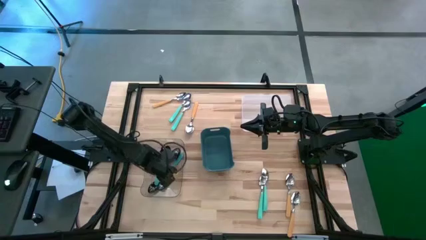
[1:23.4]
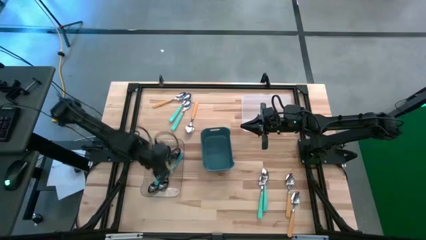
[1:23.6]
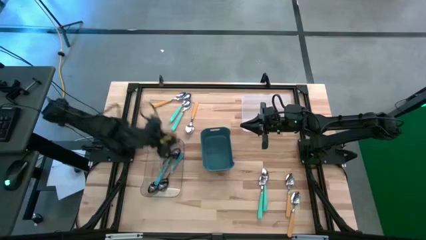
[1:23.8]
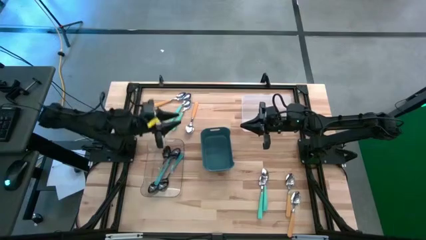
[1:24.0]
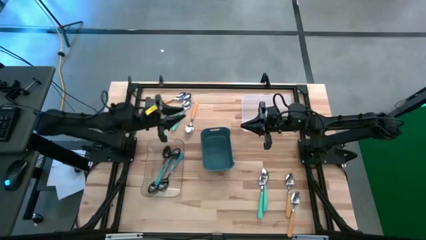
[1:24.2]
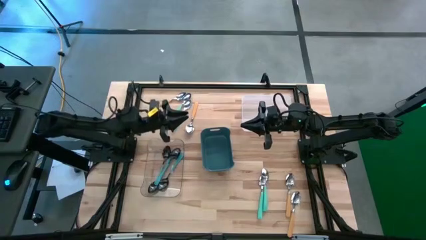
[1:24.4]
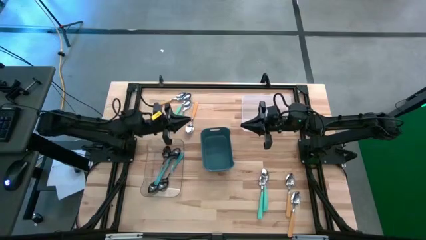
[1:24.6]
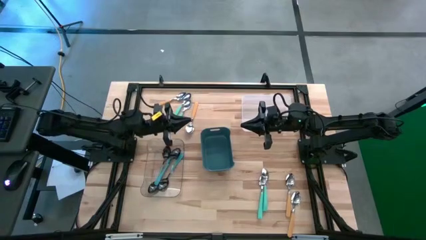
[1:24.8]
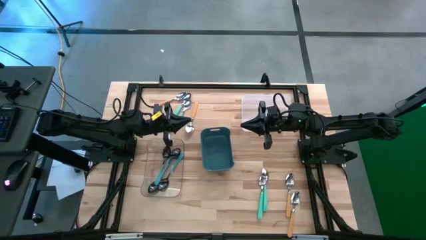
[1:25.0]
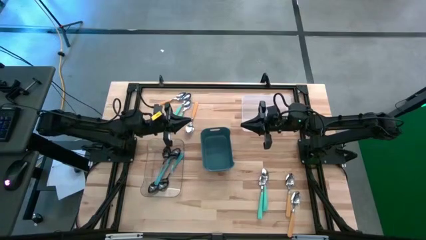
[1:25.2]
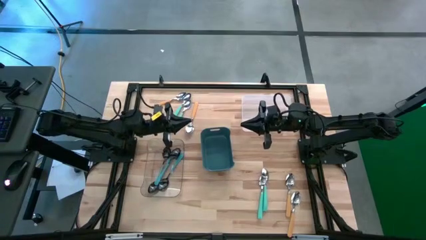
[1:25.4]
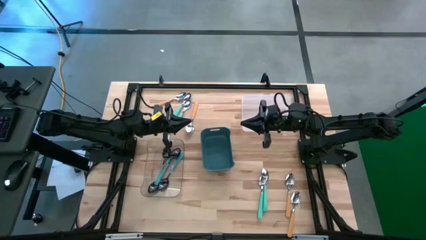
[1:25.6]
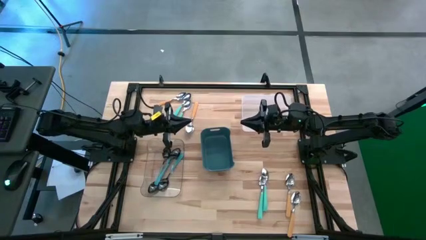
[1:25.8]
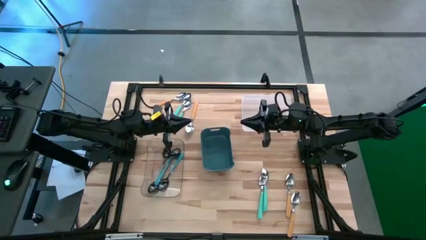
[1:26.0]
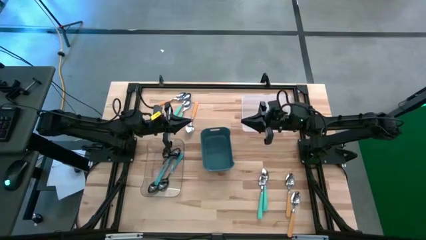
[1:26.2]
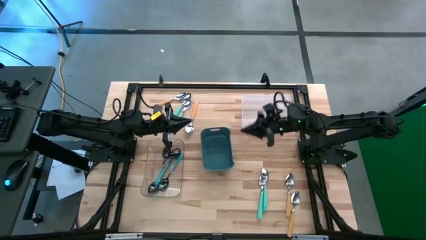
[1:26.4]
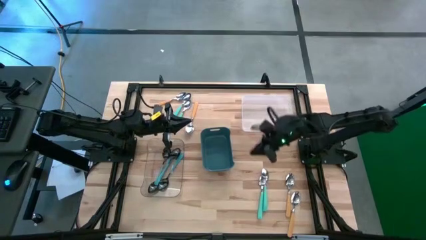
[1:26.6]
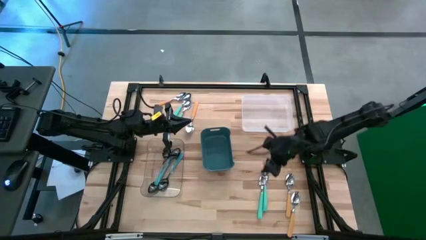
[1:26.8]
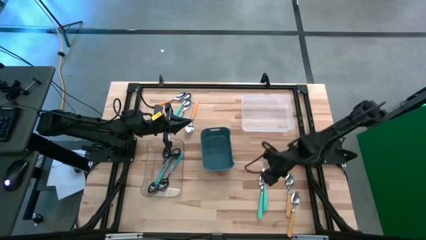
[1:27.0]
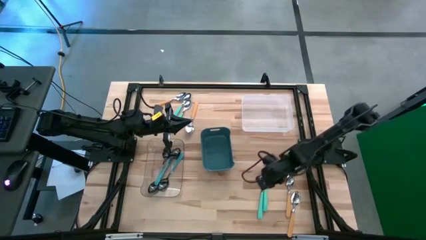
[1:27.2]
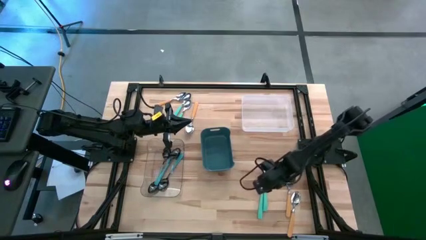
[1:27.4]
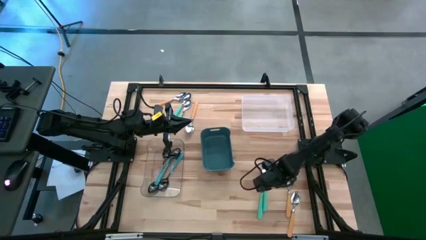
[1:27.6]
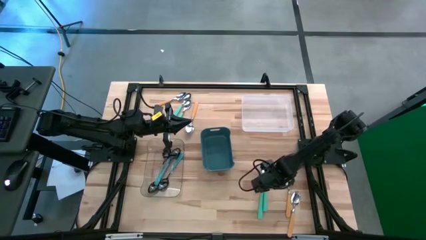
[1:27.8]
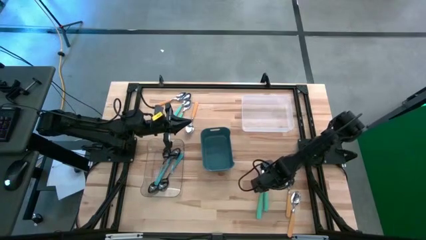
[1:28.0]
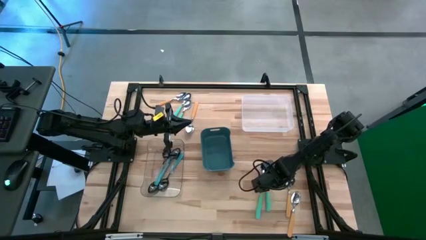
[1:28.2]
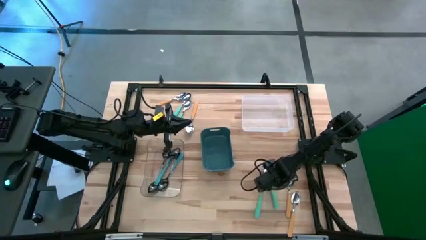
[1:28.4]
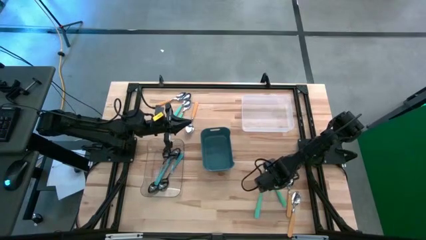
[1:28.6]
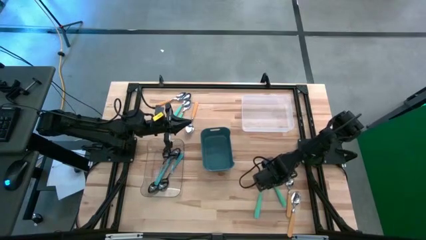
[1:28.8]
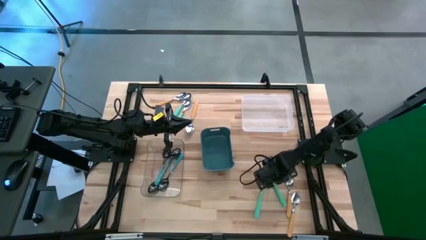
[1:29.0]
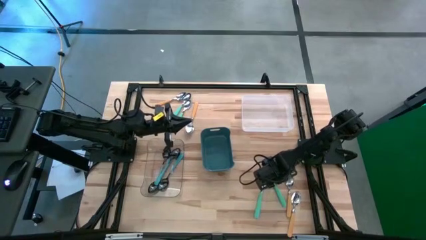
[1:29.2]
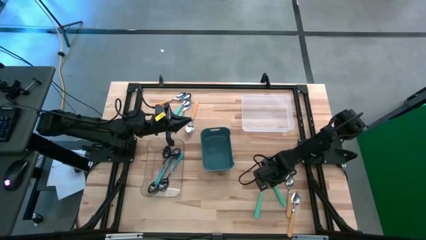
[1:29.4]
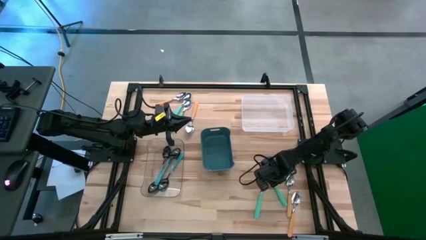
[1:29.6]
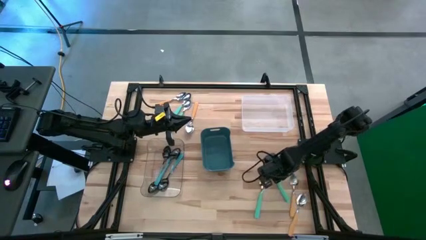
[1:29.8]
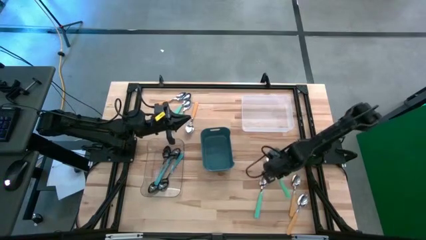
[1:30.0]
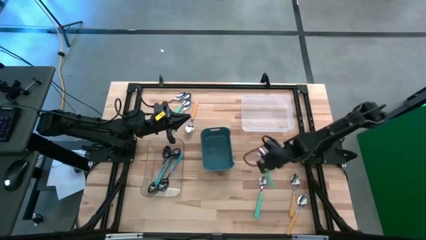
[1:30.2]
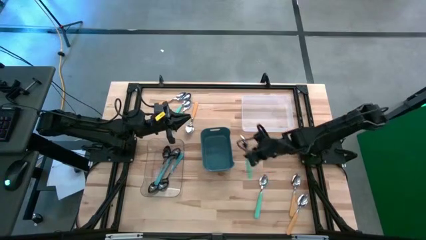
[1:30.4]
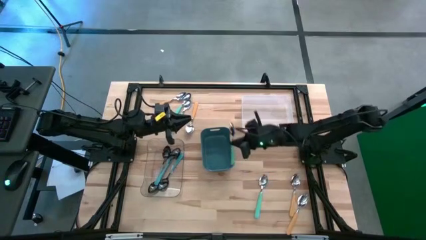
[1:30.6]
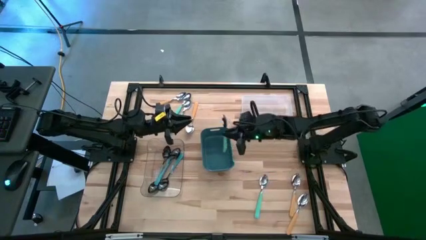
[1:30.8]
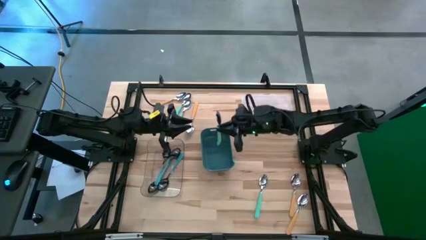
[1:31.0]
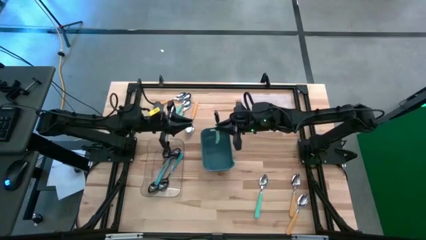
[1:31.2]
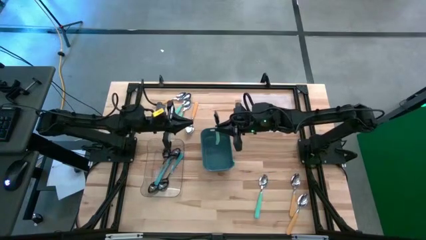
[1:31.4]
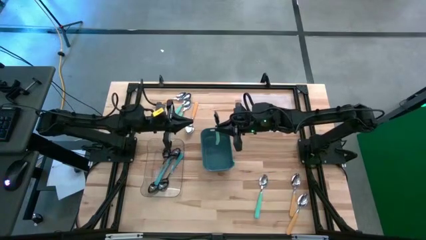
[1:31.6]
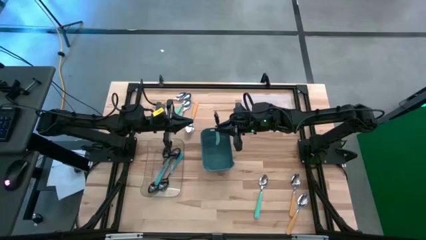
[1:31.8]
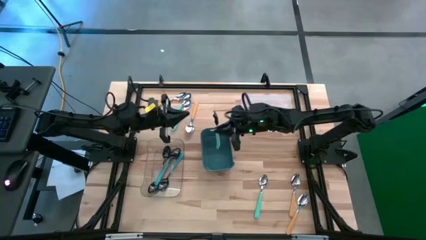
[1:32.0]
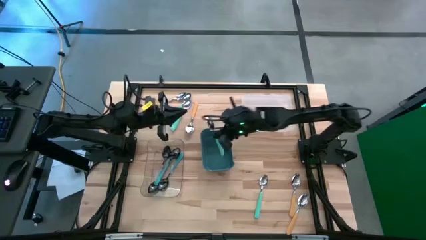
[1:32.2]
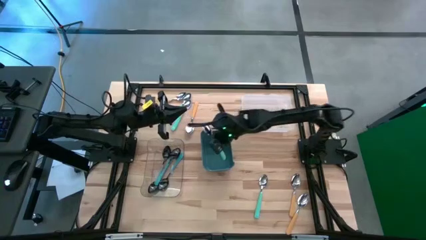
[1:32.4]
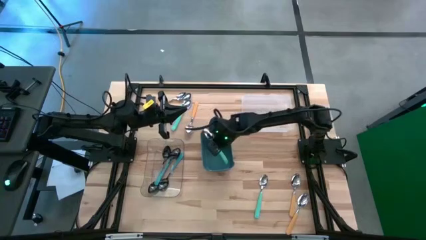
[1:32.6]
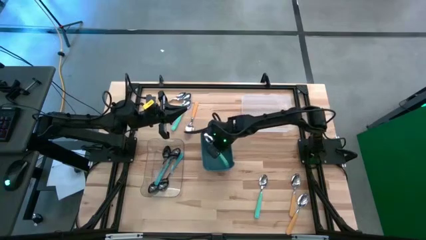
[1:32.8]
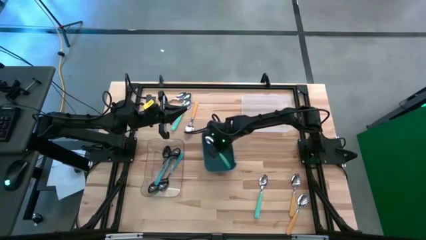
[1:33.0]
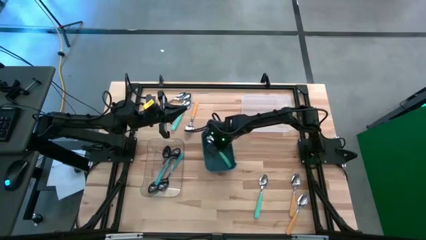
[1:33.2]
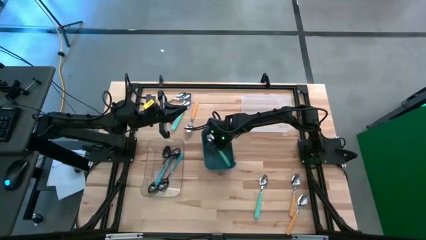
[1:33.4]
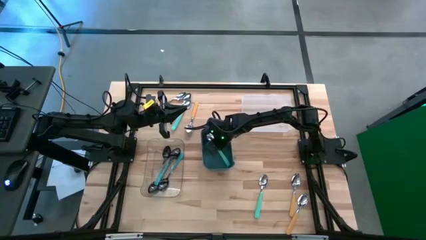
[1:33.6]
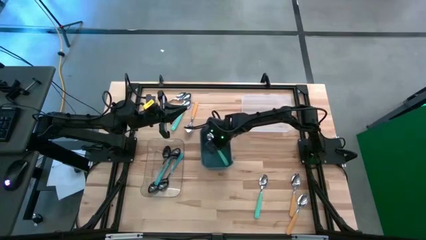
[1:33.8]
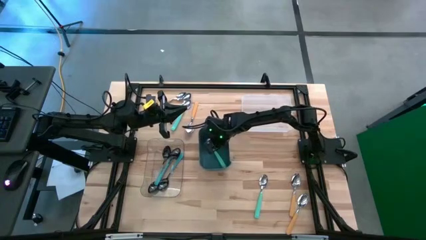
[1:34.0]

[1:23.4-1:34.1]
Task: Sort silverware by color (type)
Put the light blue spoon into the blue bin

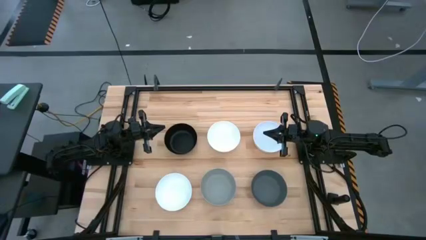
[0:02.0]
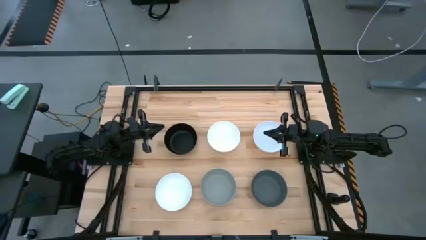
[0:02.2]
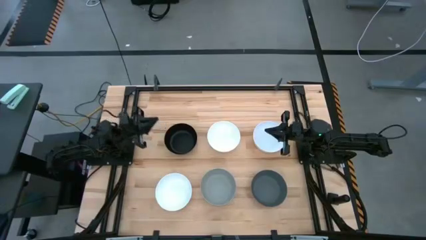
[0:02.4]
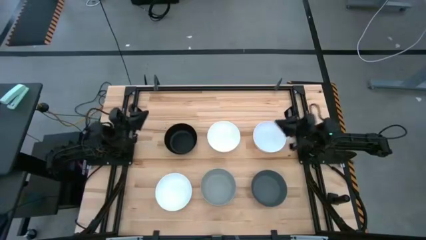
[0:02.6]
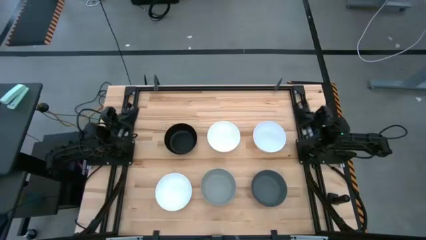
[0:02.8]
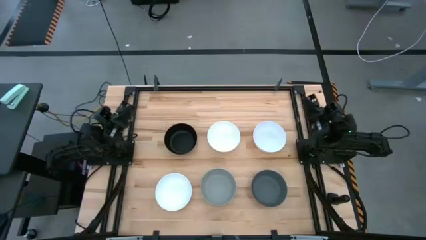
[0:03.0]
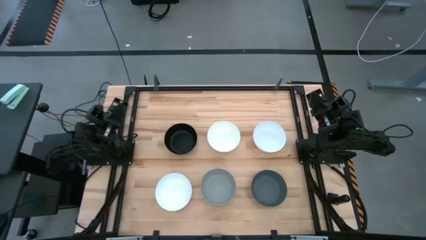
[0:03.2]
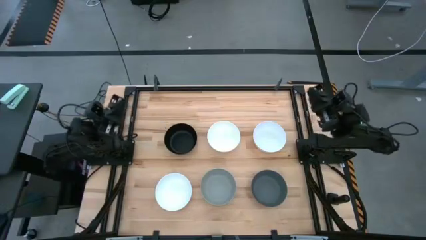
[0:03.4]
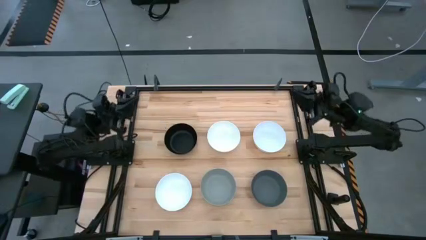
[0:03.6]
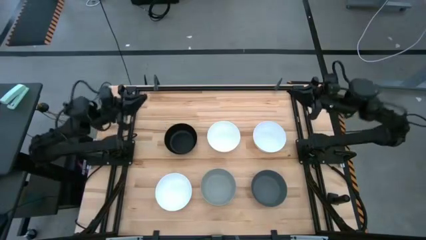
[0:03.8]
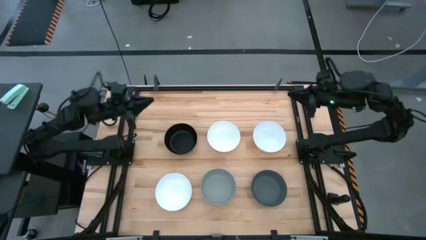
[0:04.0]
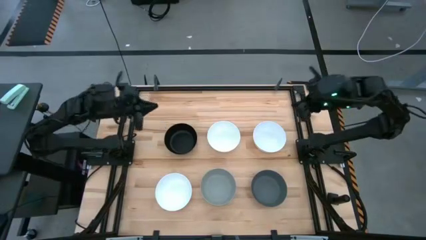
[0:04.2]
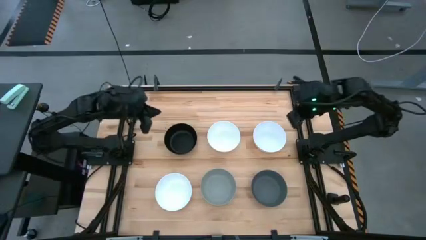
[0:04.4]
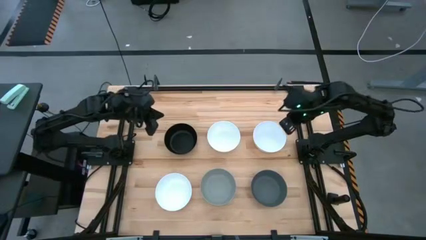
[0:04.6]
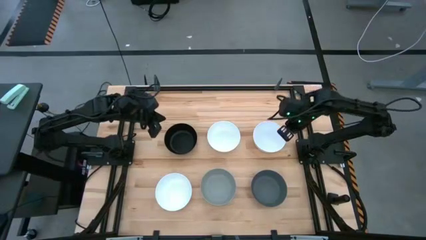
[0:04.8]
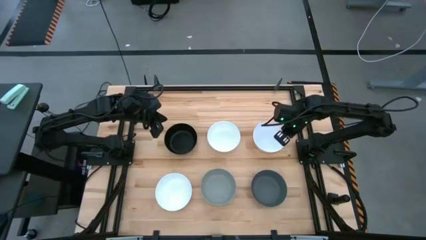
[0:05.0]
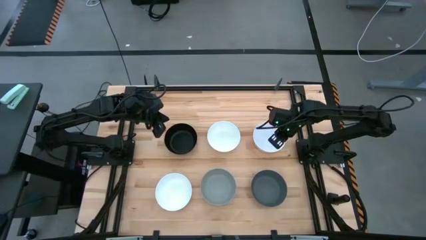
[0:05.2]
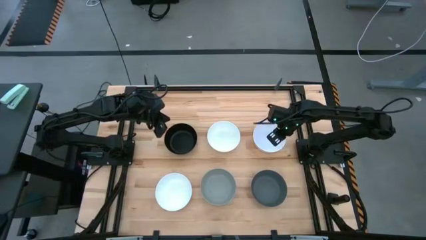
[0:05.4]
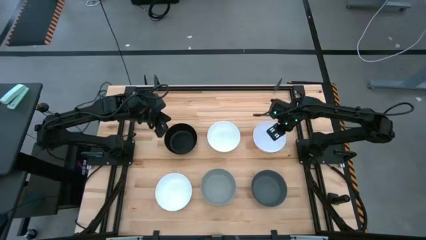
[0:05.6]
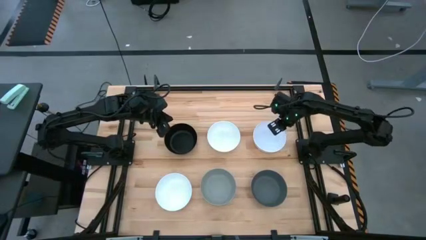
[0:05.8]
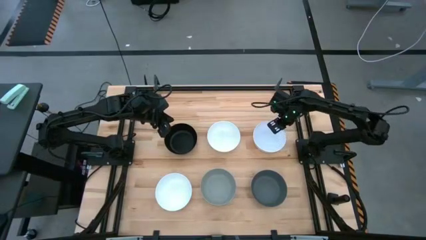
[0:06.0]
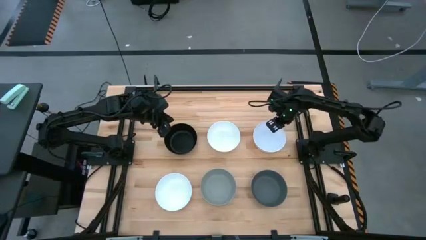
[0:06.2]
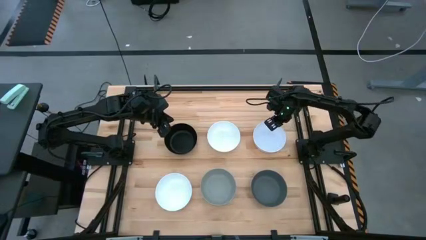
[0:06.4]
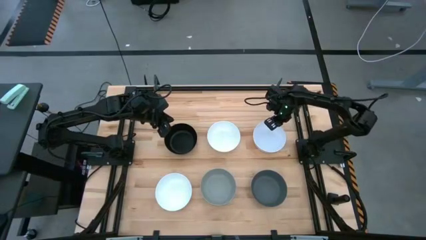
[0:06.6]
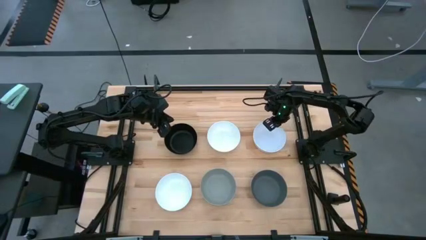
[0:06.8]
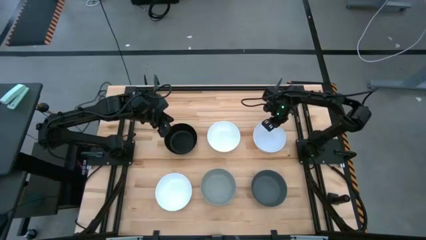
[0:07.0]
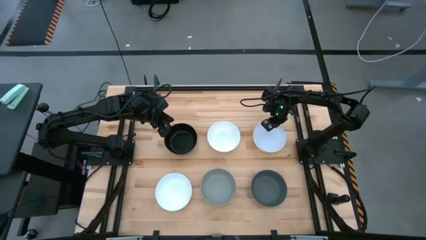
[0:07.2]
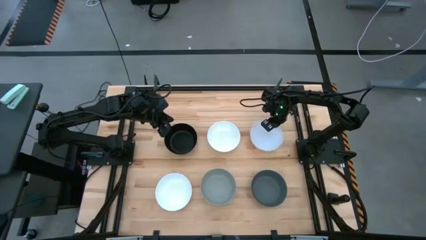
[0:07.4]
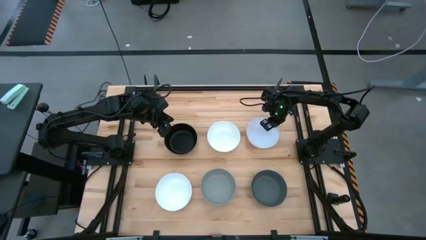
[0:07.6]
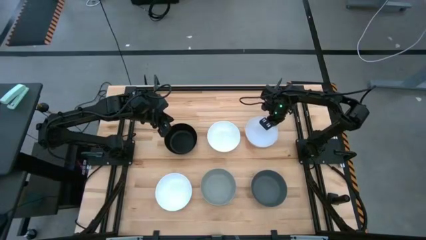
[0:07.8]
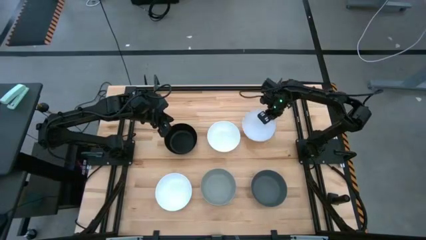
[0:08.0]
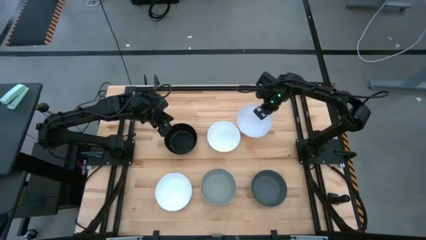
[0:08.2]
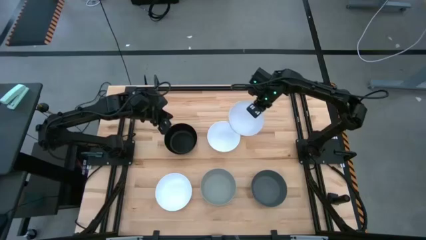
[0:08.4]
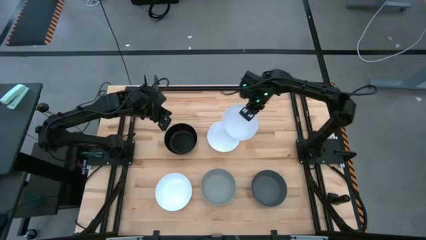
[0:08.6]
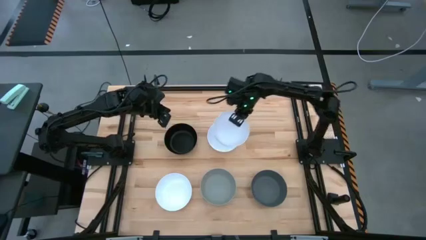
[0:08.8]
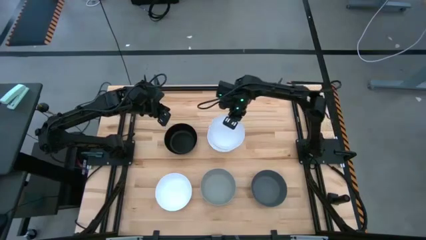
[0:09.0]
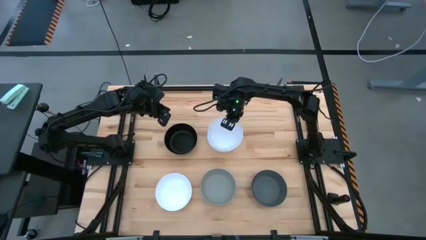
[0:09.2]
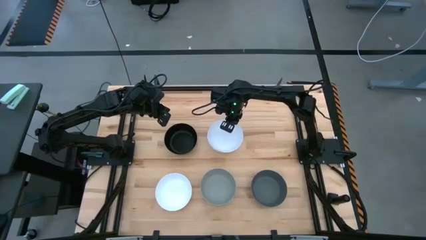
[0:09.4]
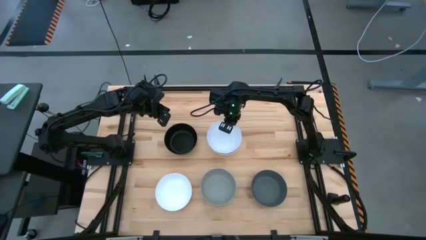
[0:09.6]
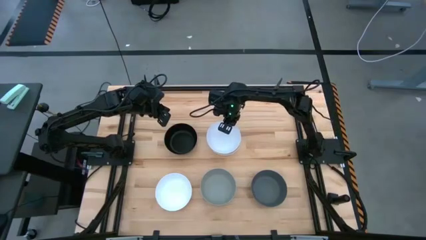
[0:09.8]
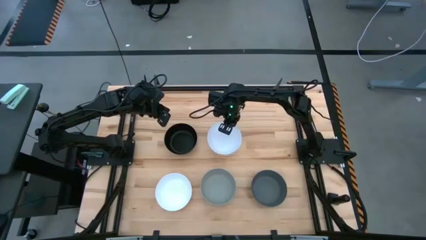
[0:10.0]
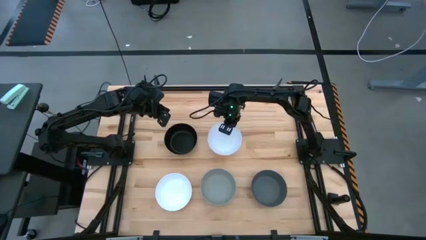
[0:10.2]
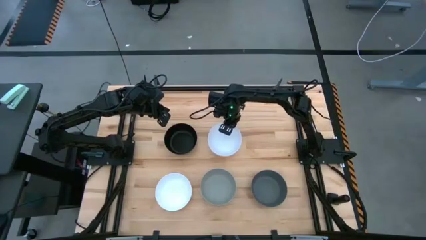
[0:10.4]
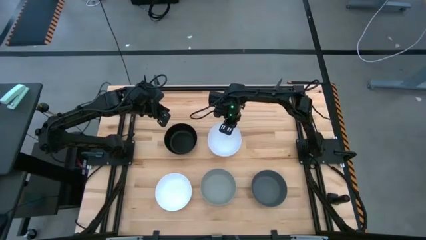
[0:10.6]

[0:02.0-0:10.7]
Task: Nest bowls inside each other
Stack the top right white bowl on top of the top white bowl
